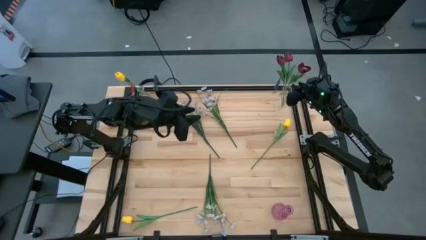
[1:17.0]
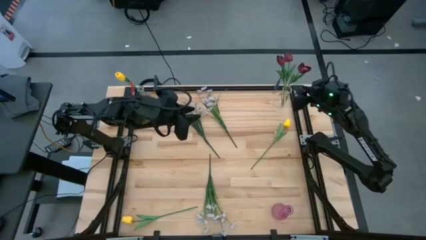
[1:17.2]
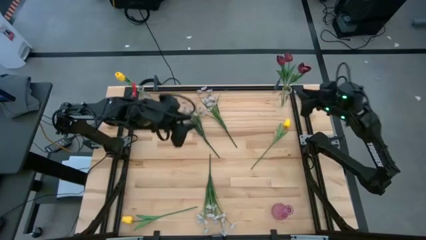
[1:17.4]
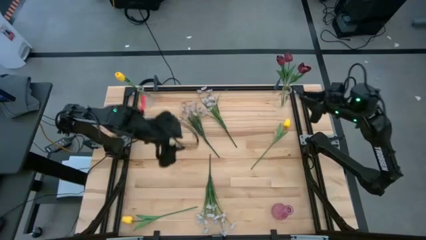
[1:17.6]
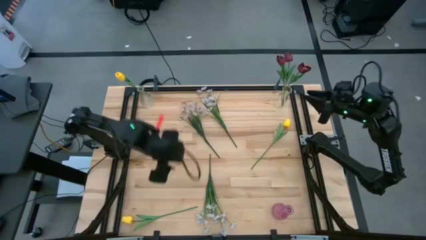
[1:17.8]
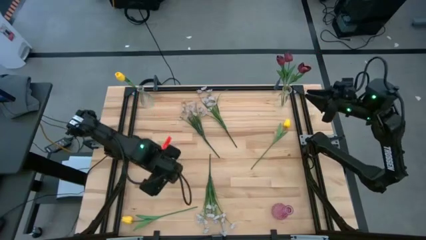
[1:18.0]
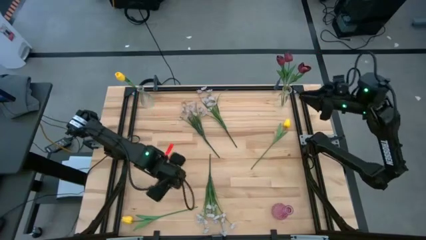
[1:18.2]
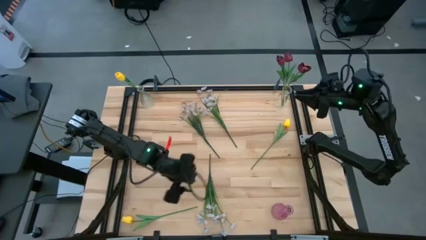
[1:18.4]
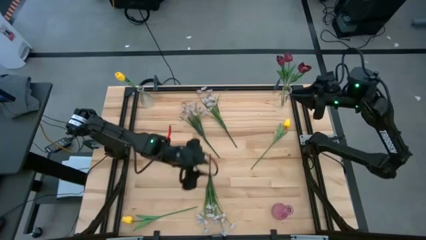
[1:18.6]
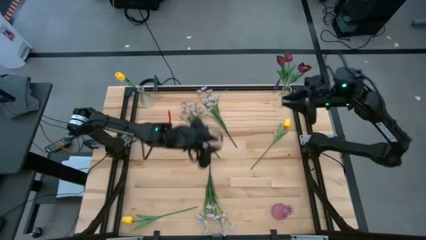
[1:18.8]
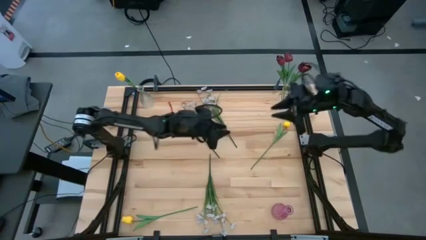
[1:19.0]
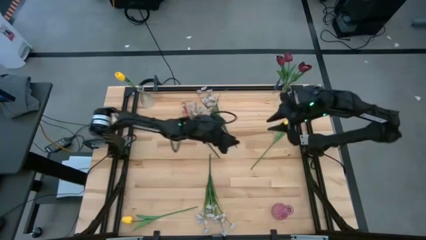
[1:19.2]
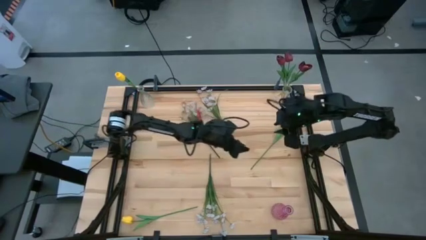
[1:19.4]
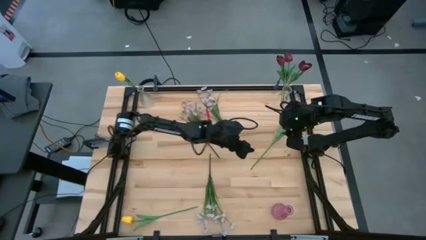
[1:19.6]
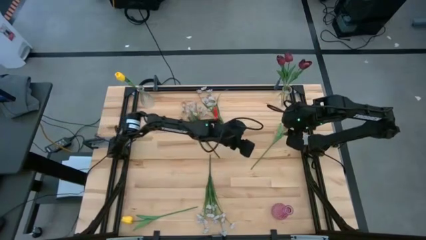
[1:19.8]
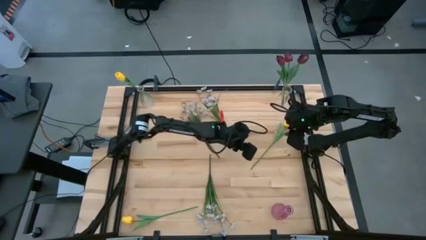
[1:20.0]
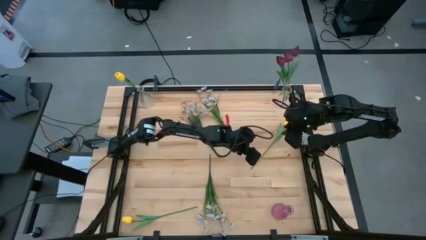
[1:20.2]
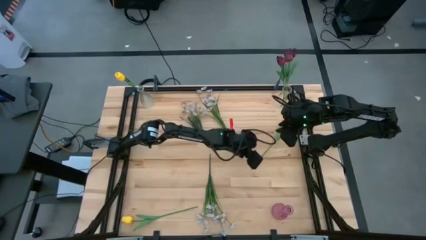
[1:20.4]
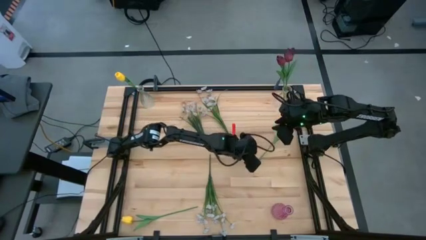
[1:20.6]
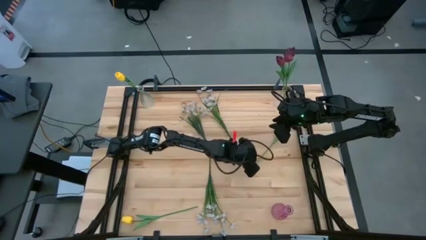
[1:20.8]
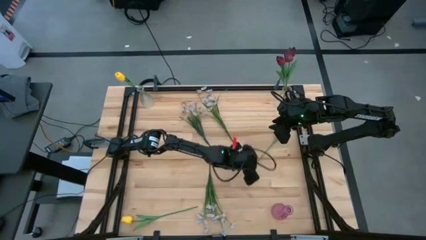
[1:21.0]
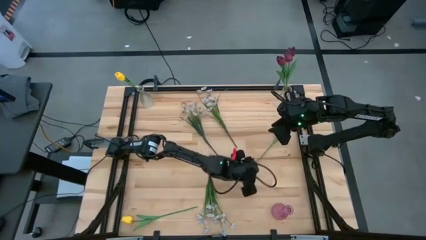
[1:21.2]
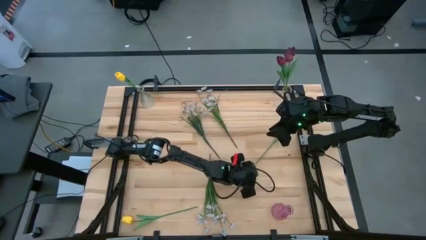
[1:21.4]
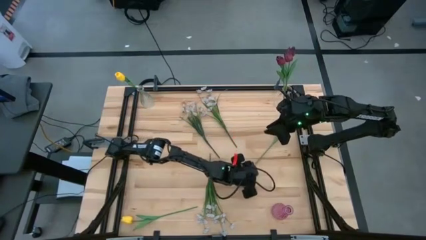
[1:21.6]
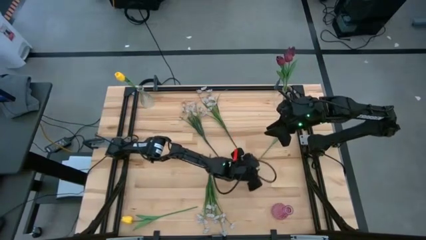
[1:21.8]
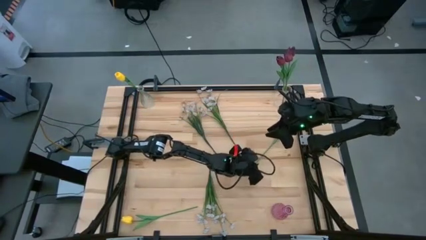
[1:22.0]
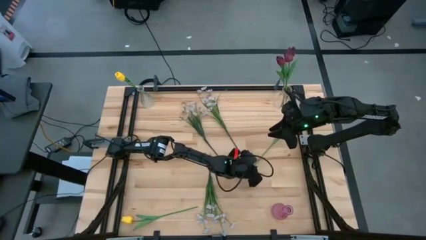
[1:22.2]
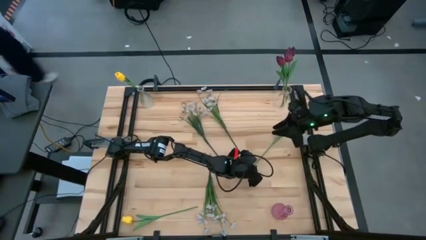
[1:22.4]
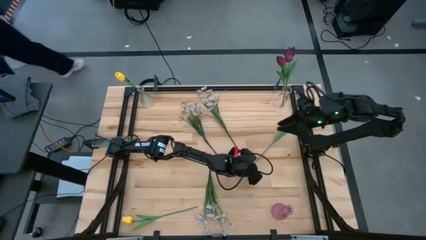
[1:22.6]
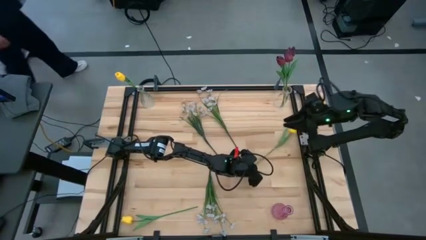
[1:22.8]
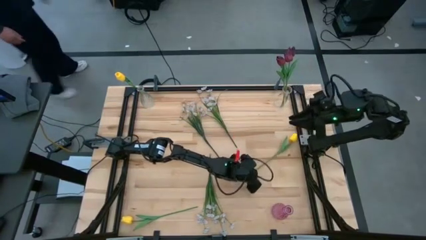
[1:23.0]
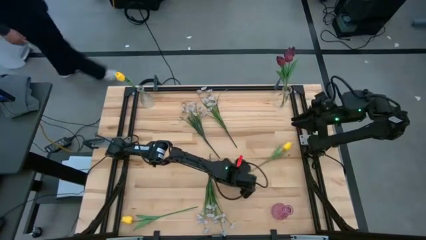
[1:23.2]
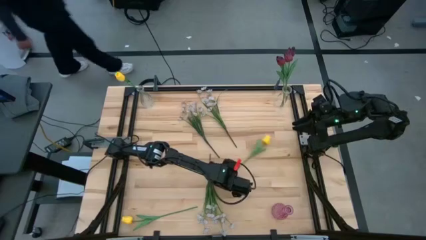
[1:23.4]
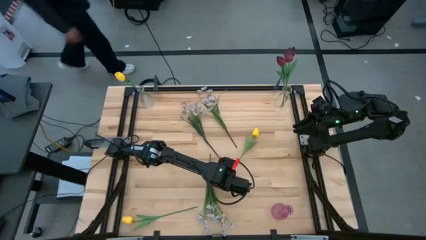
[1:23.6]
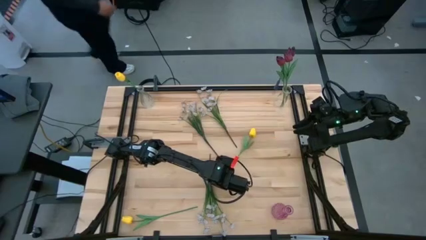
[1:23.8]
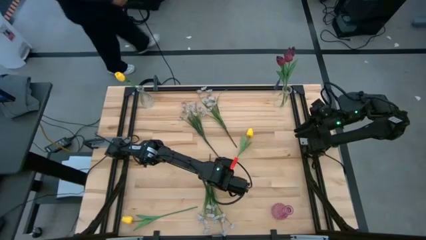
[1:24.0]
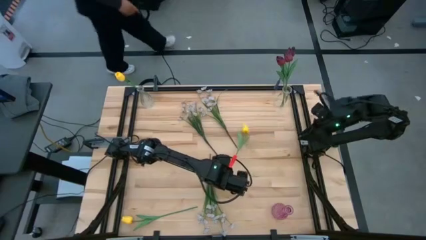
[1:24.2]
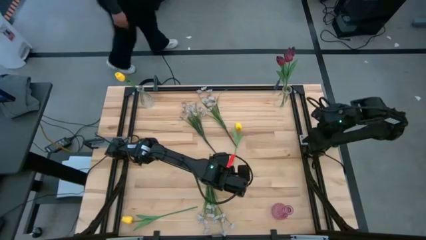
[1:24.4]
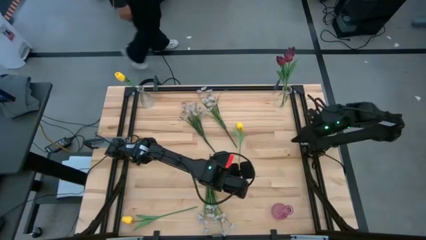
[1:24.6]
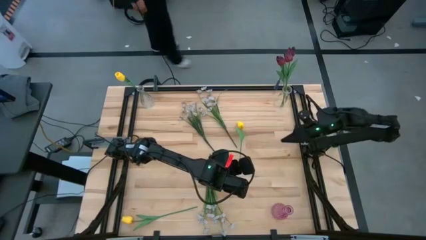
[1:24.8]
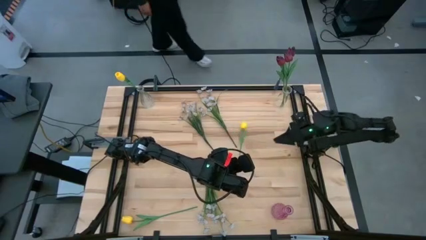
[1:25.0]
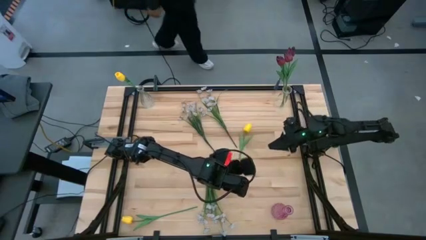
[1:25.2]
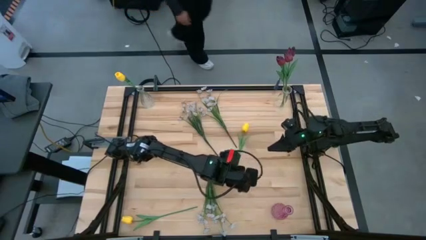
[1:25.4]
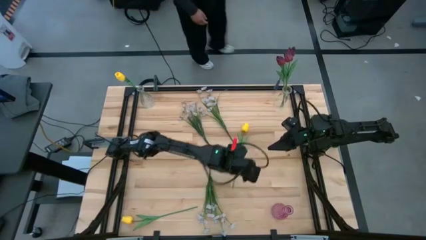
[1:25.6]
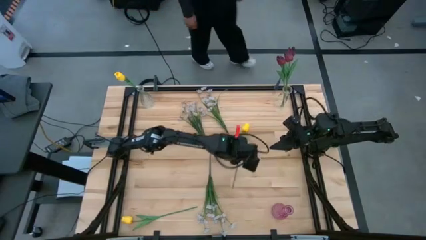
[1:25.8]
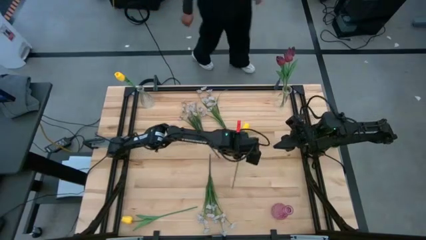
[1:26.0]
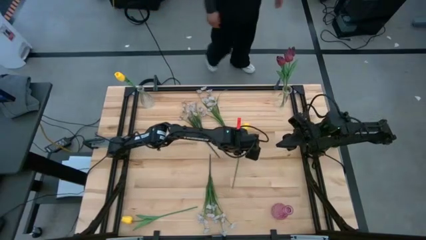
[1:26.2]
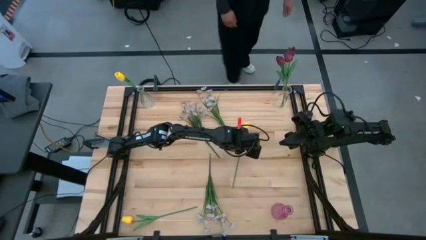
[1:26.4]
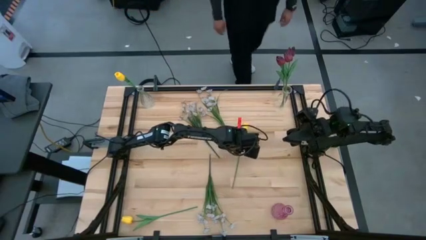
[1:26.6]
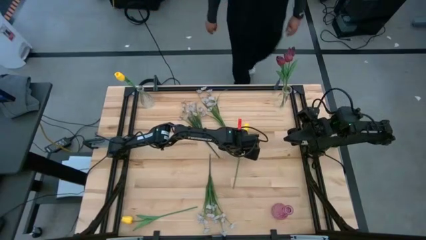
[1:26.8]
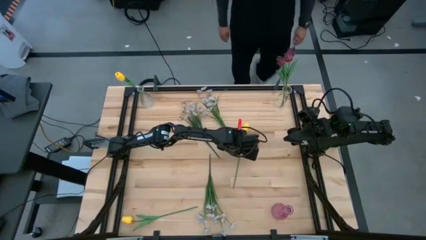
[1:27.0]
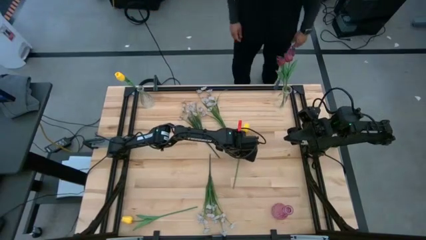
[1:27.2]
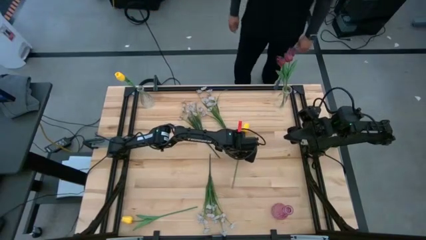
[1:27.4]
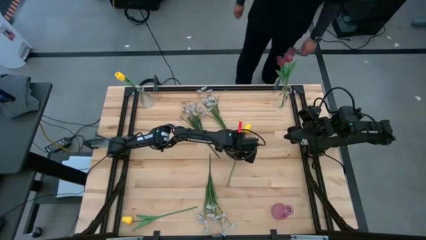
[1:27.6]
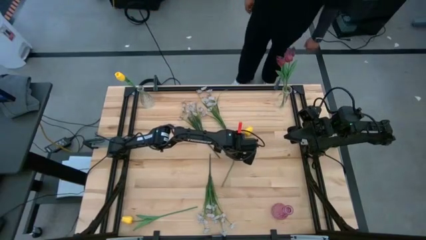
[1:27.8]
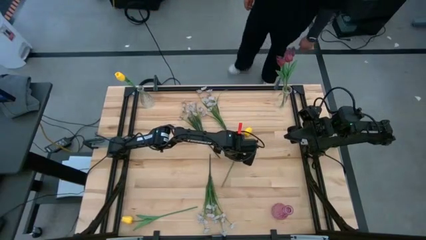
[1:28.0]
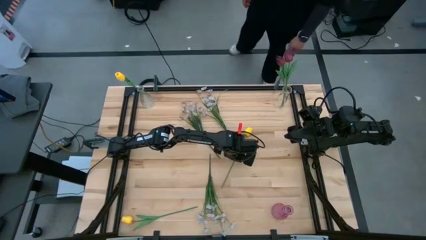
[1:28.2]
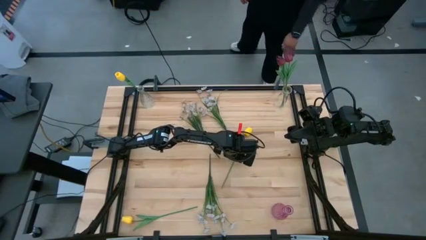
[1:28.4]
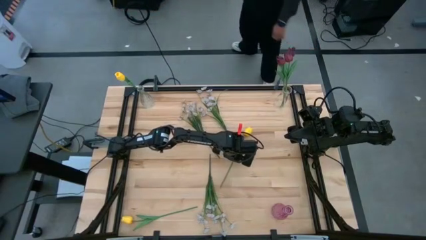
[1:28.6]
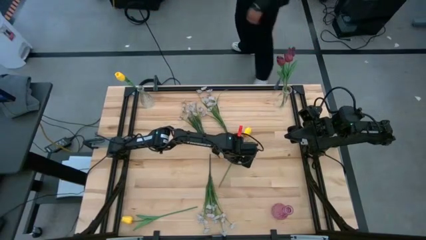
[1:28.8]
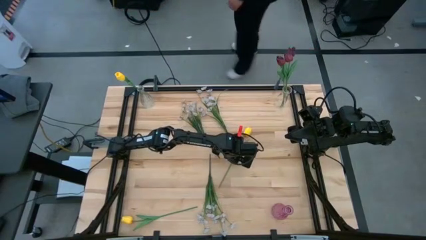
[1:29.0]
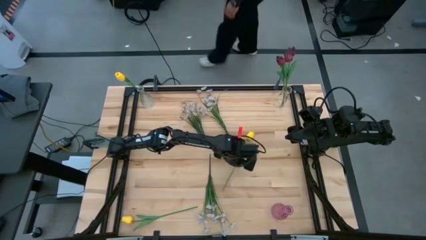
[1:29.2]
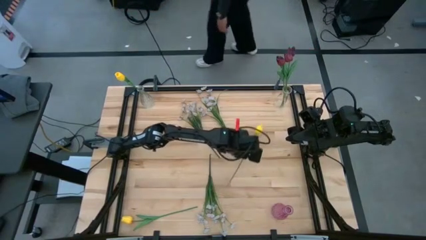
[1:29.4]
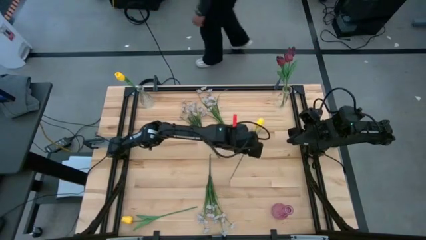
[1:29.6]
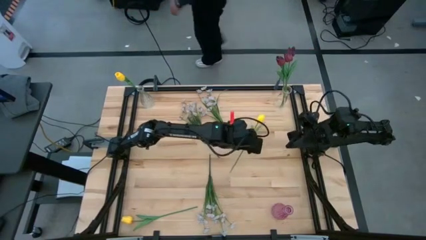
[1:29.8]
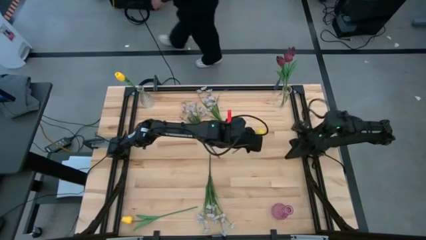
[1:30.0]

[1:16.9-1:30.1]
Task: Sort flowers into vase by color
Put the top yellow flower into the left transparent vase
